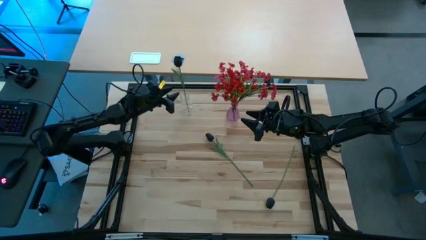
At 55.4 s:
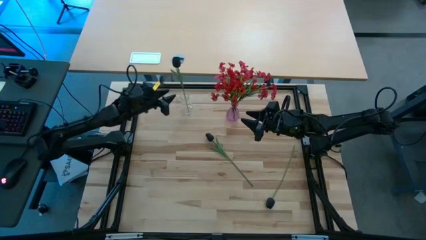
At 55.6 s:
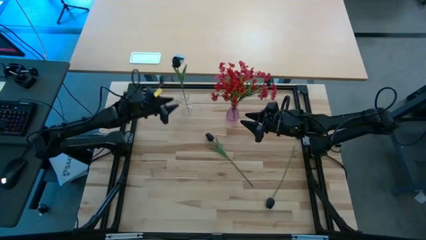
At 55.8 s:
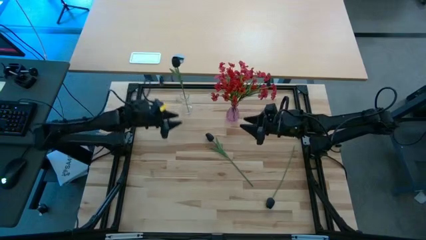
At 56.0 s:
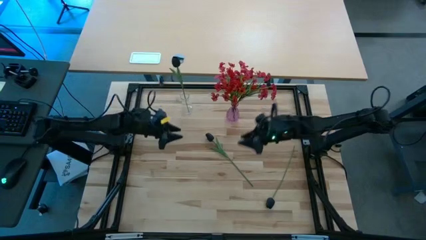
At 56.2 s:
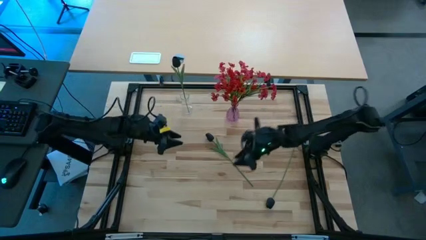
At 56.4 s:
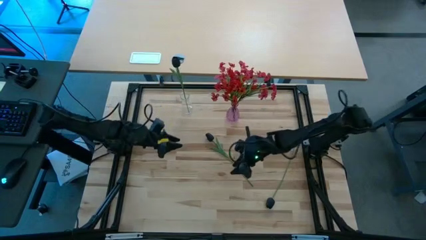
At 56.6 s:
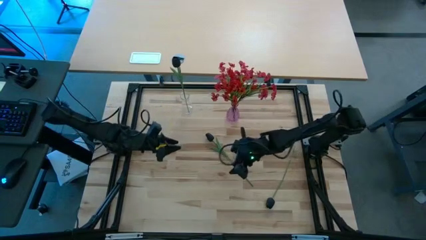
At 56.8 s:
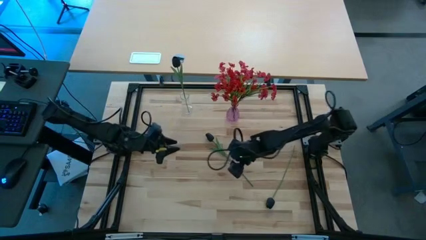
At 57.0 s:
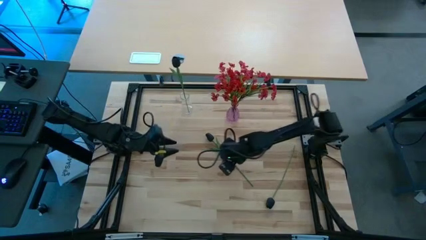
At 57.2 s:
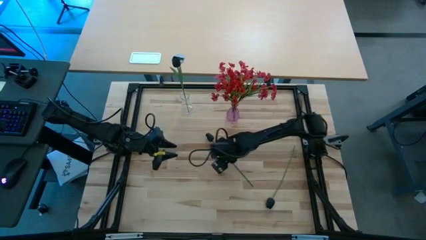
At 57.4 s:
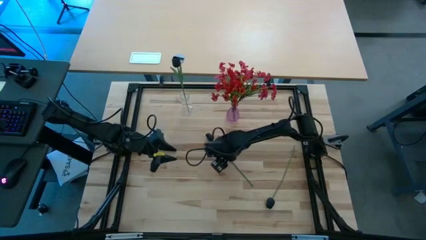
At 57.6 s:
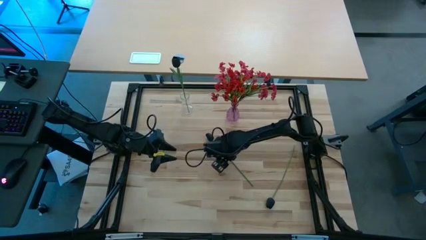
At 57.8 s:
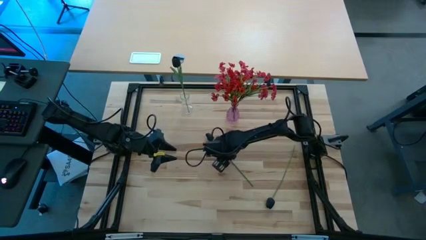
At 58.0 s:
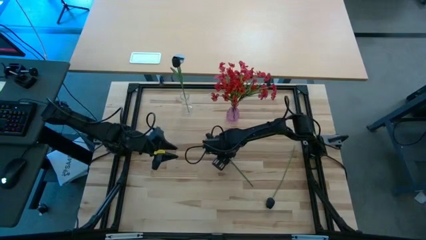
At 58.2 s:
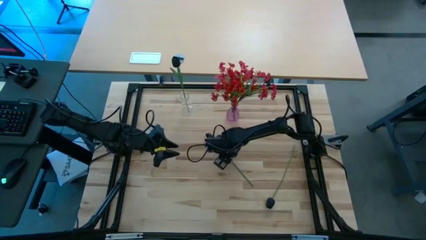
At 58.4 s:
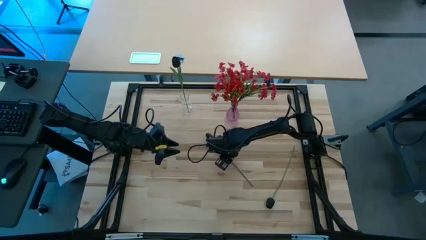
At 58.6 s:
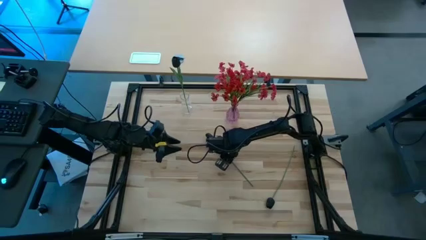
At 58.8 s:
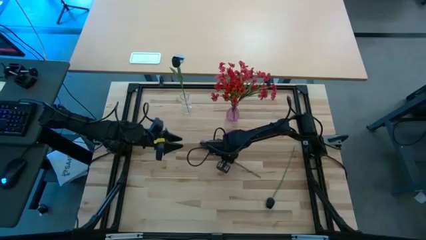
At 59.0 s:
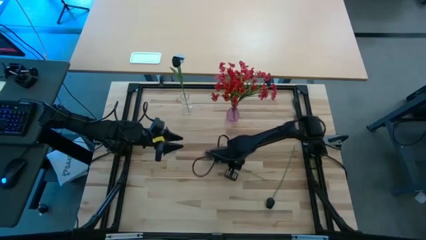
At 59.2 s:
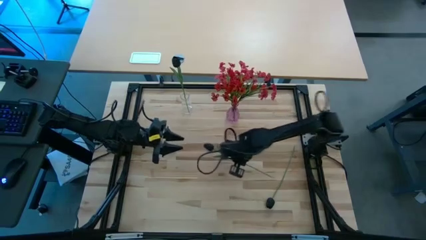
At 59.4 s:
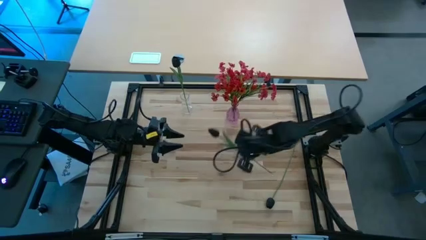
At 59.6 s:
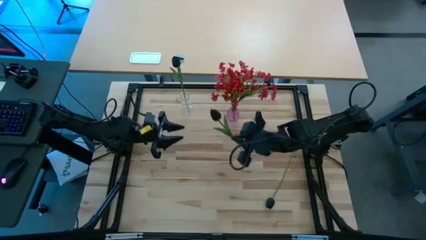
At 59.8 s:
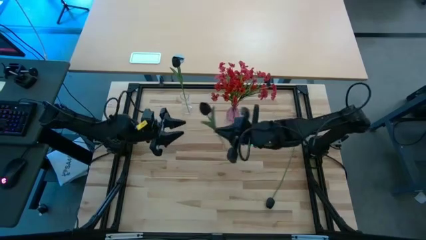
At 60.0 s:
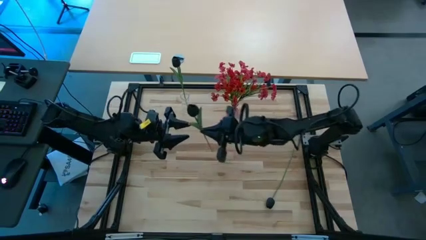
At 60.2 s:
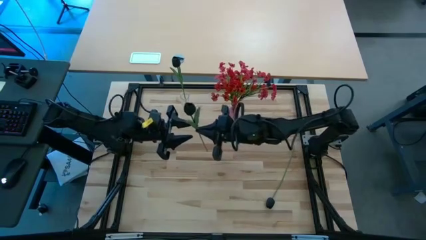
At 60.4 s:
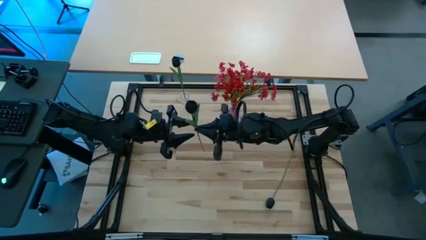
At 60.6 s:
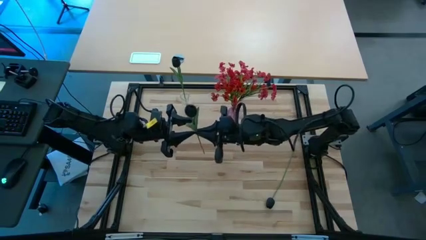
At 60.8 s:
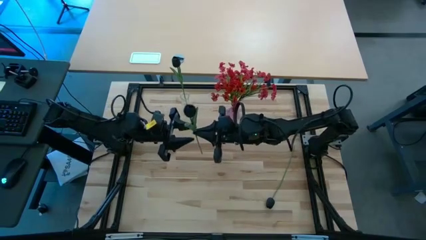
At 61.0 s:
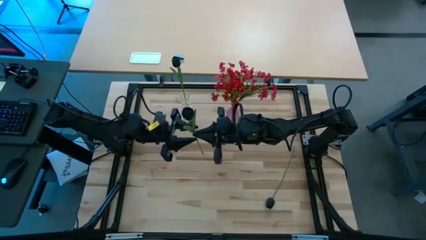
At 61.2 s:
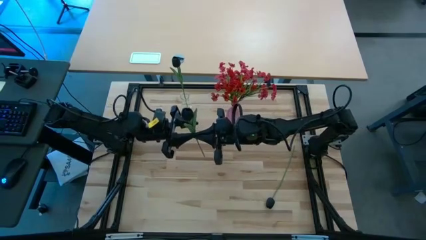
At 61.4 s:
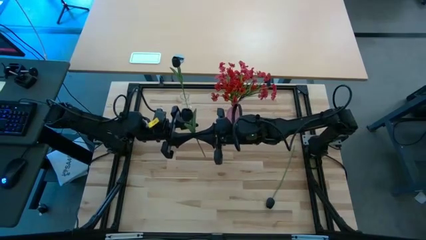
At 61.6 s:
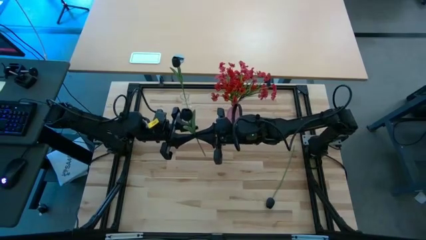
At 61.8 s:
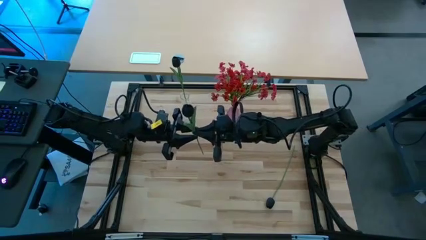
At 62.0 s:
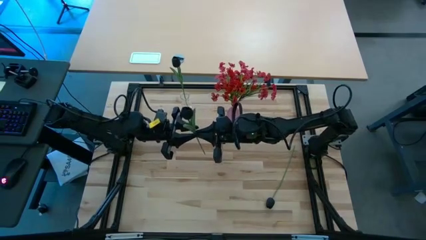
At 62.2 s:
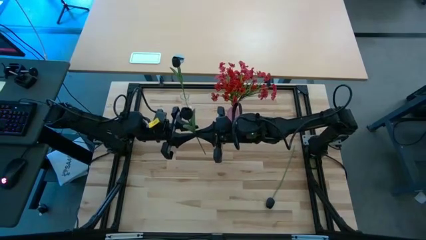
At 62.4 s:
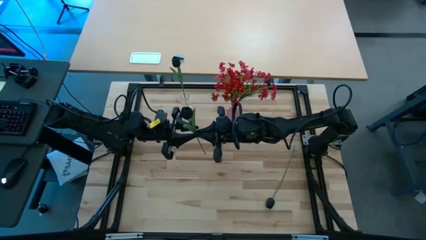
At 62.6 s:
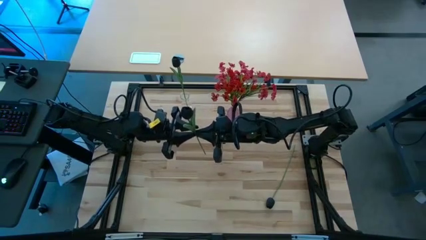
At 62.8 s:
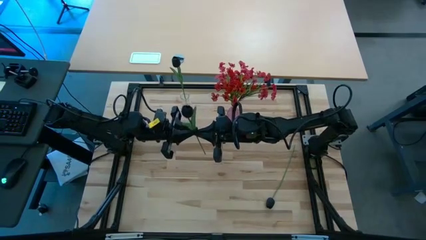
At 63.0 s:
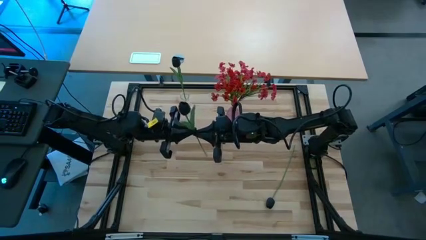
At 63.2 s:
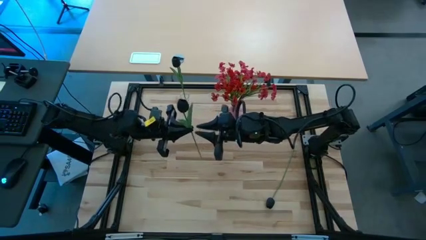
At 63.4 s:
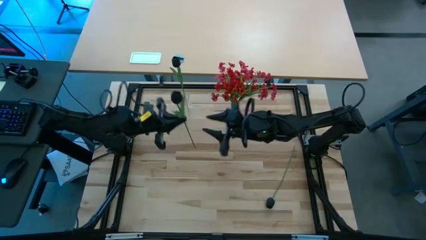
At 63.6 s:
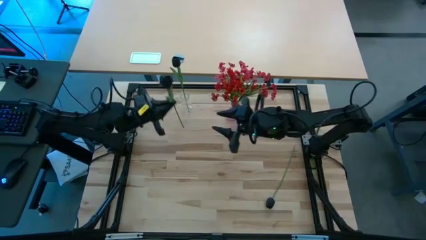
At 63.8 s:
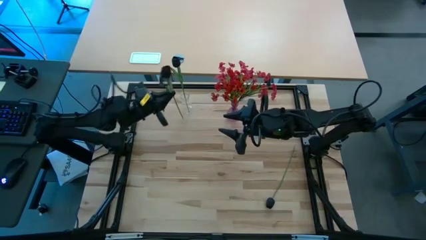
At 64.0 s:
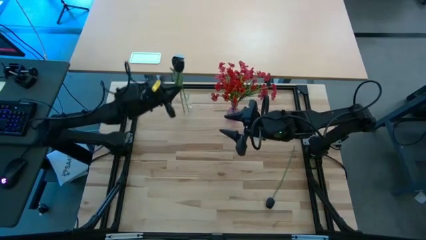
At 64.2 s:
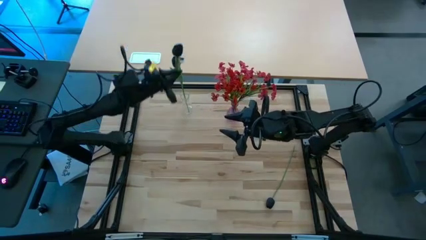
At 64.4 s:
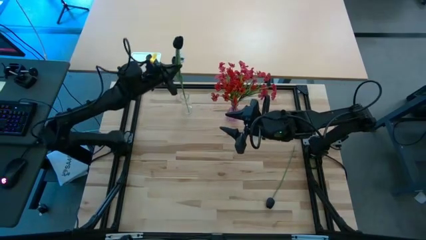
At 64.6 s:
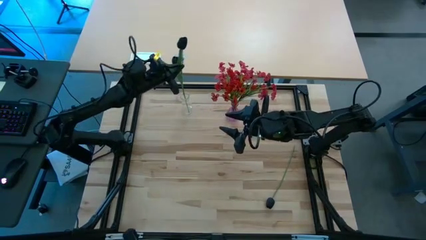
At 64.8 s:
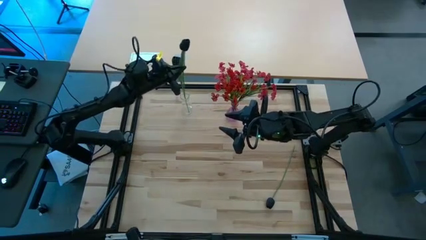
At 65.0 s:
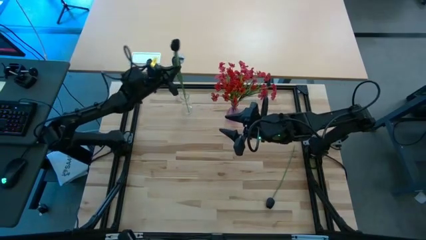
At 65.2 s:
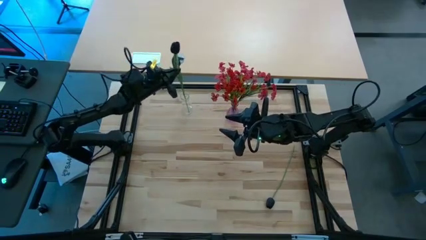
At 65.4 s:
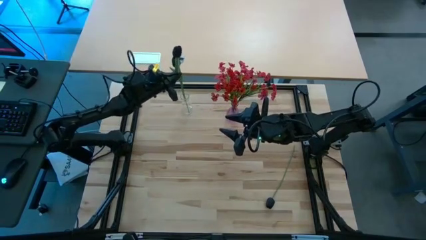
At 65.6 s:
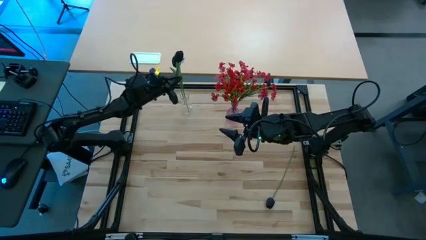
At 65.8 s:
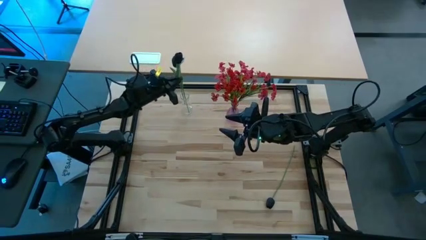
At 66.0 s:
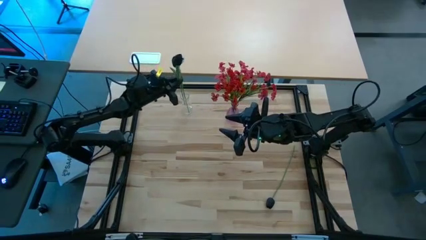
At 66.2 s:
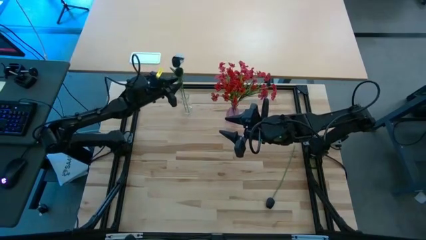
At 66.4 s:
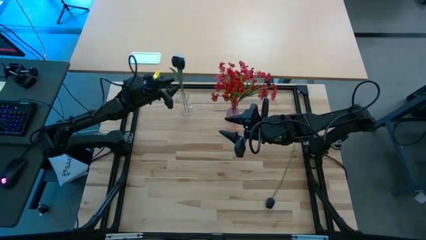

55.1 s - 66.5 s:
Task: Sort flowers into vase by color
Put the left black tulip into the transparent vase
